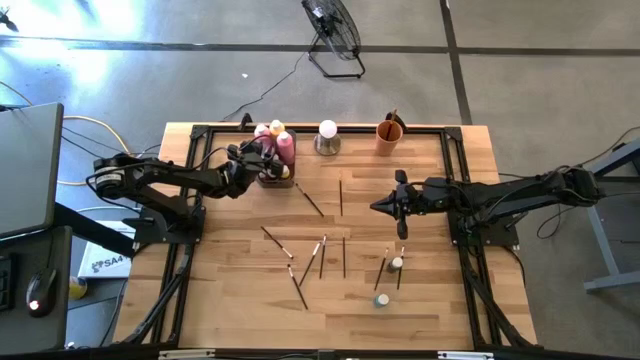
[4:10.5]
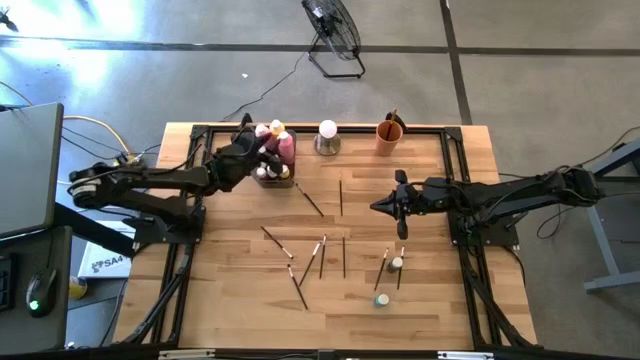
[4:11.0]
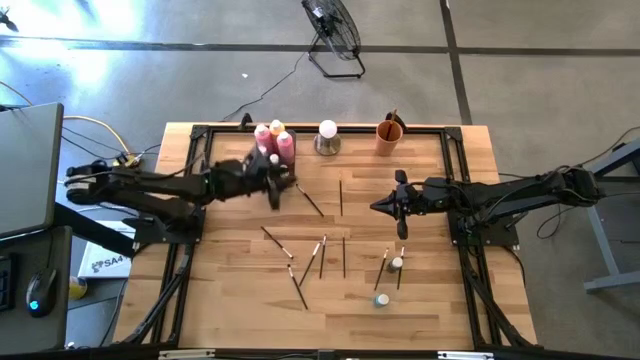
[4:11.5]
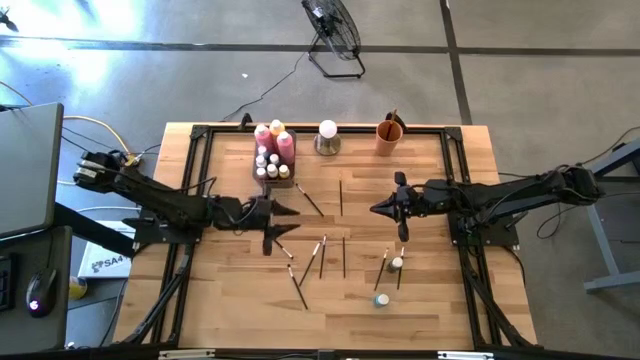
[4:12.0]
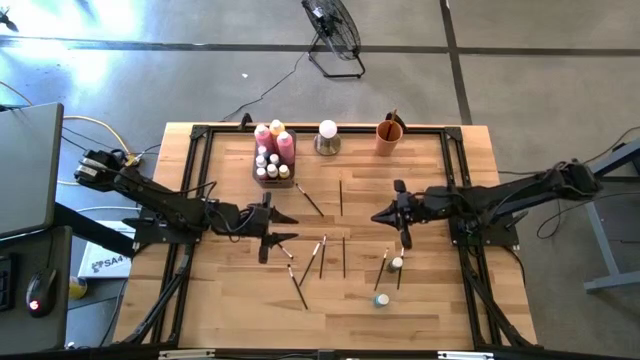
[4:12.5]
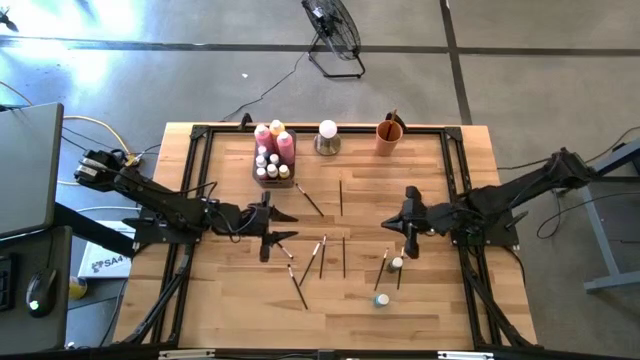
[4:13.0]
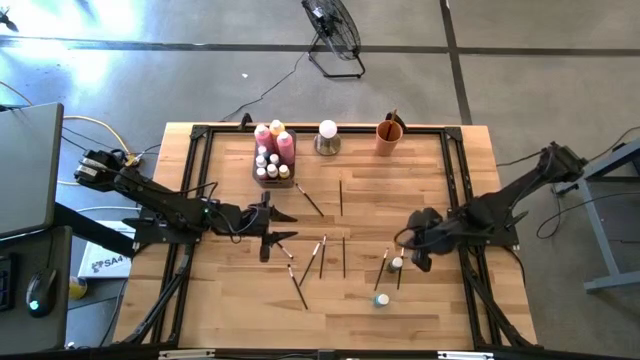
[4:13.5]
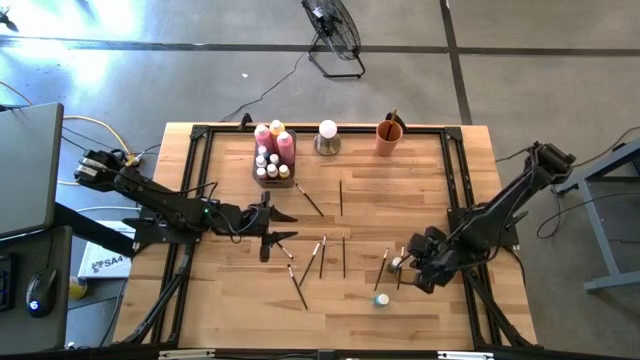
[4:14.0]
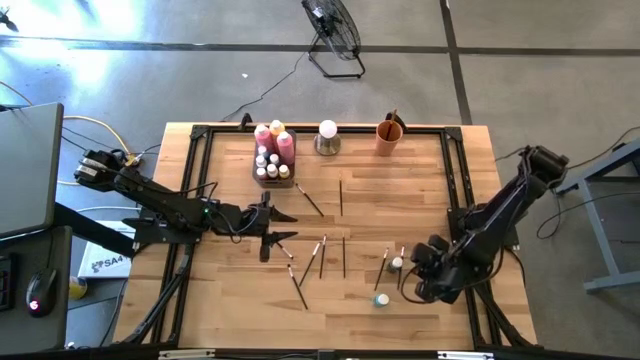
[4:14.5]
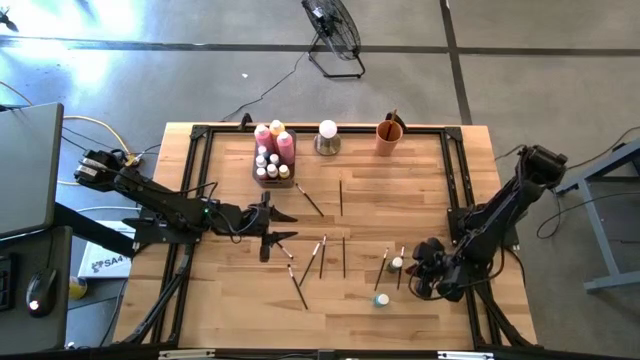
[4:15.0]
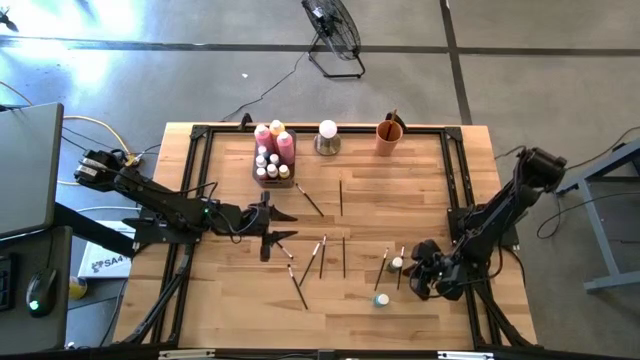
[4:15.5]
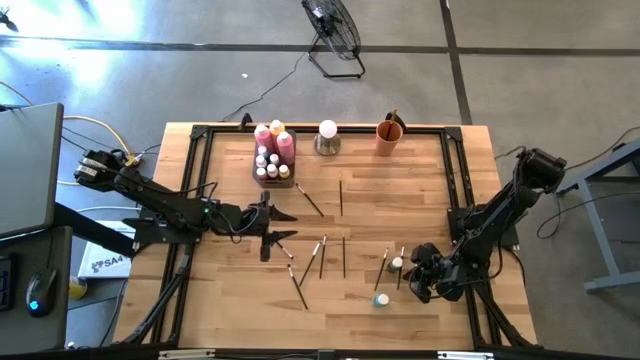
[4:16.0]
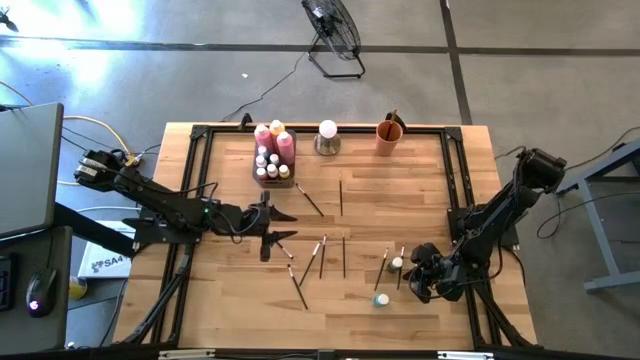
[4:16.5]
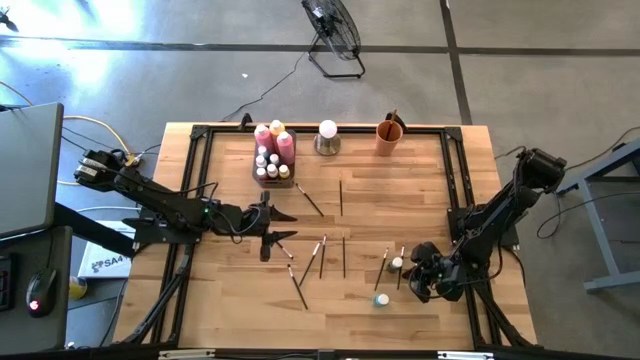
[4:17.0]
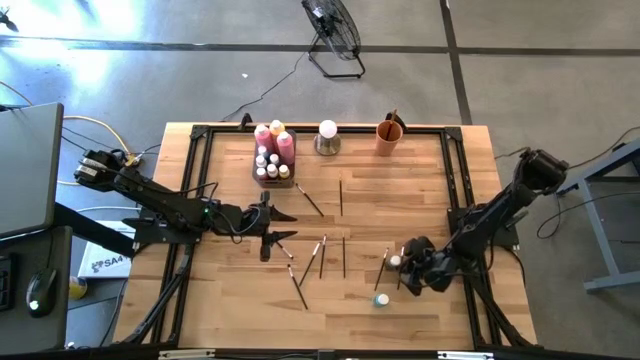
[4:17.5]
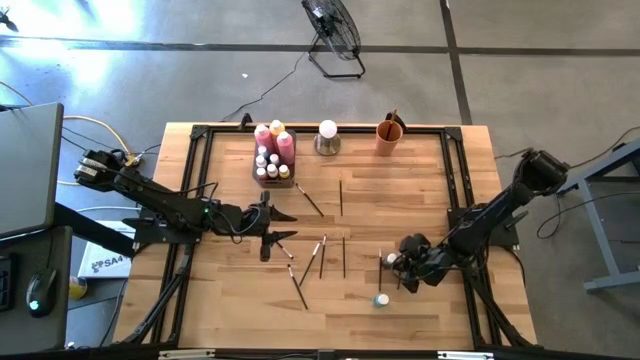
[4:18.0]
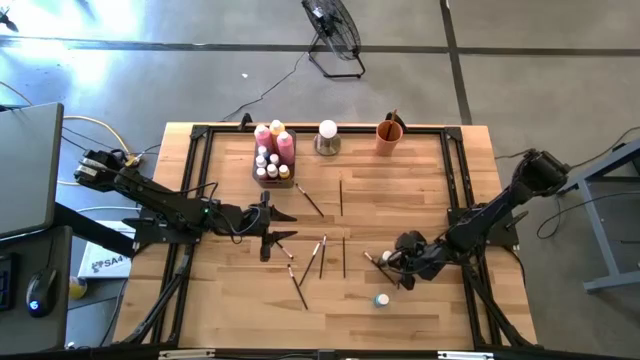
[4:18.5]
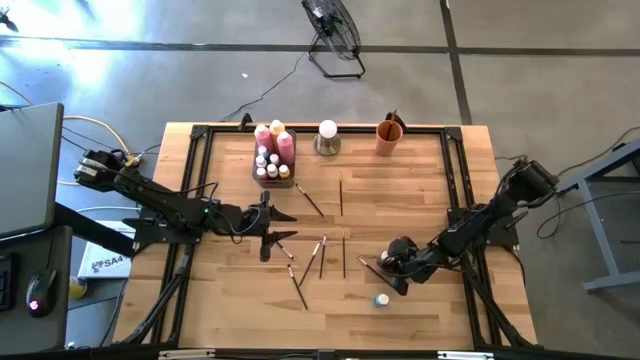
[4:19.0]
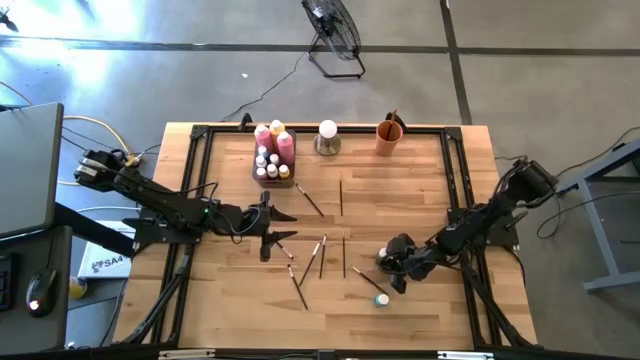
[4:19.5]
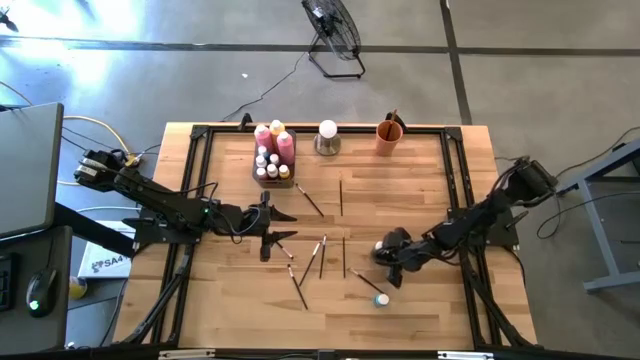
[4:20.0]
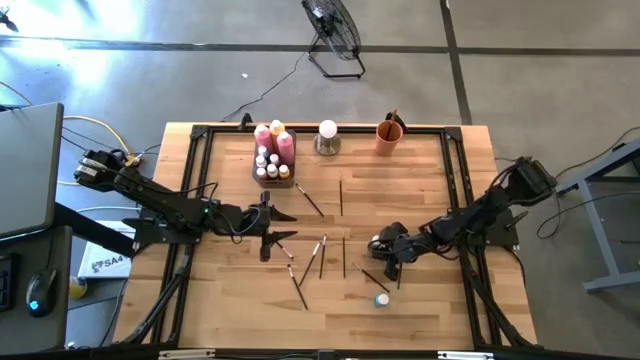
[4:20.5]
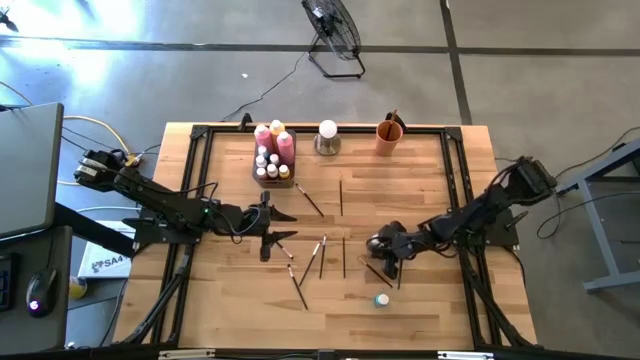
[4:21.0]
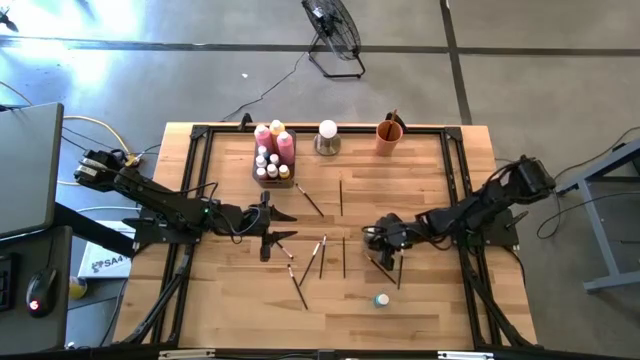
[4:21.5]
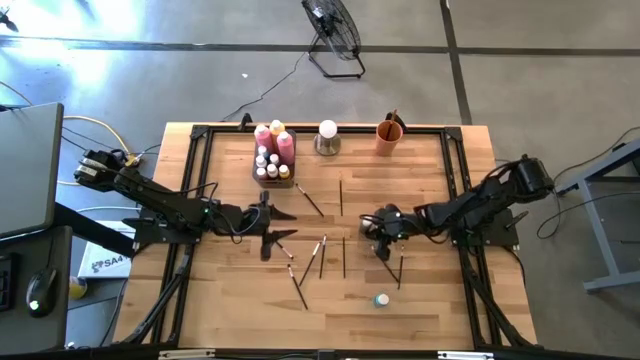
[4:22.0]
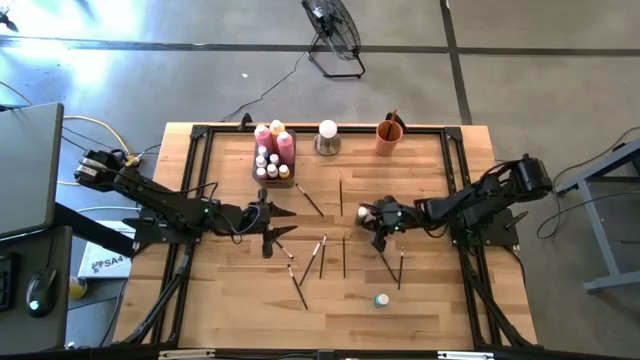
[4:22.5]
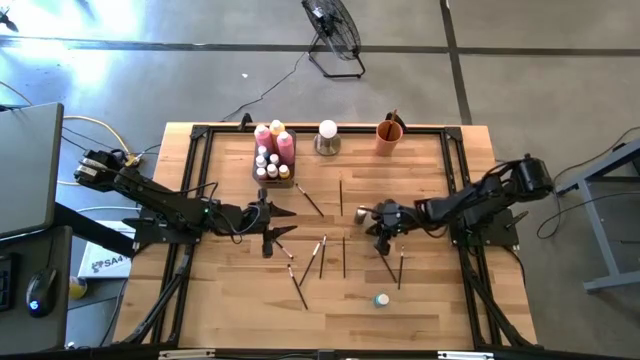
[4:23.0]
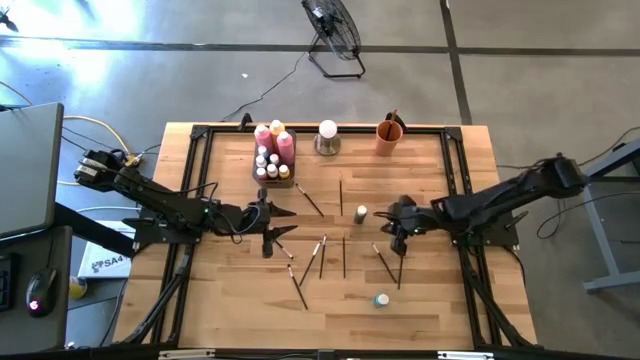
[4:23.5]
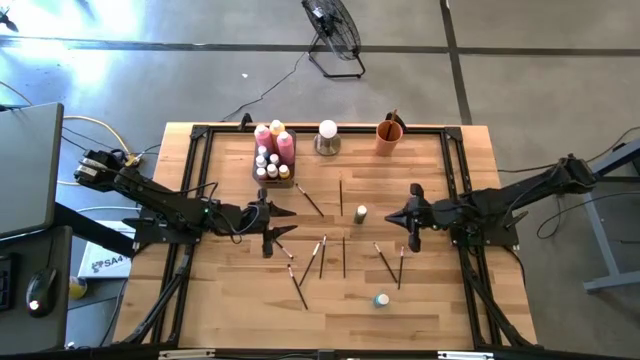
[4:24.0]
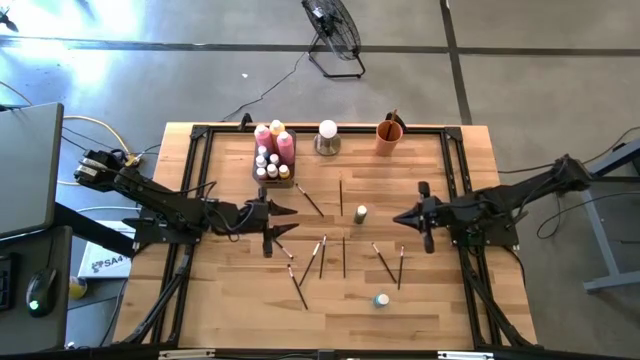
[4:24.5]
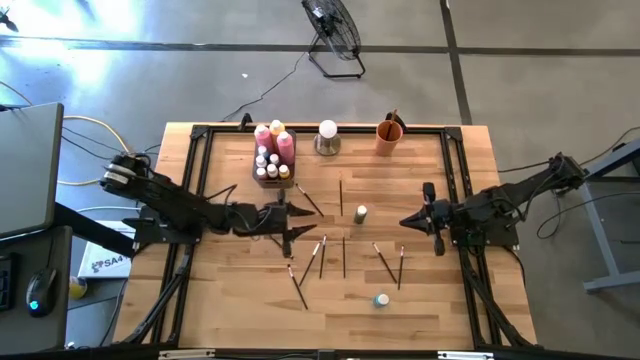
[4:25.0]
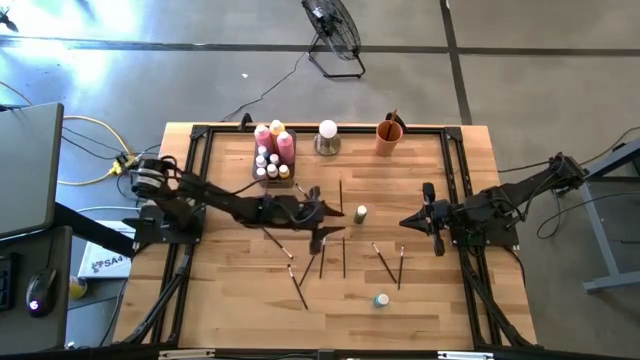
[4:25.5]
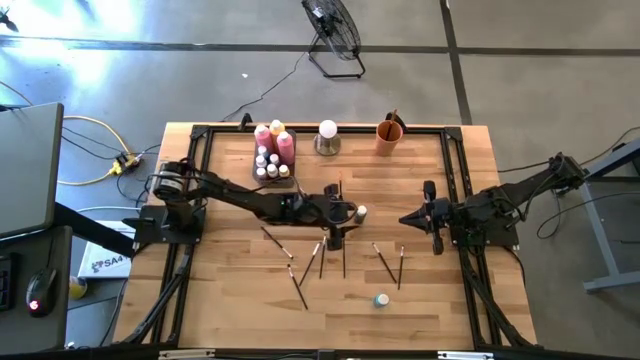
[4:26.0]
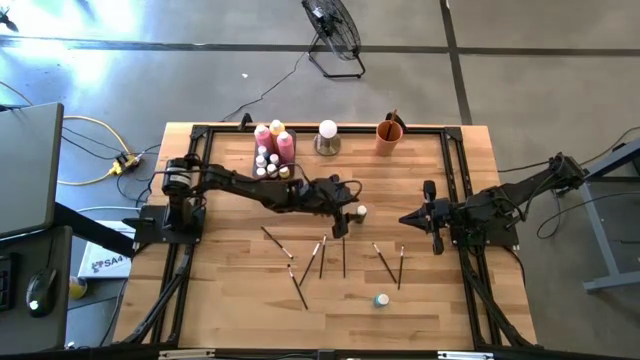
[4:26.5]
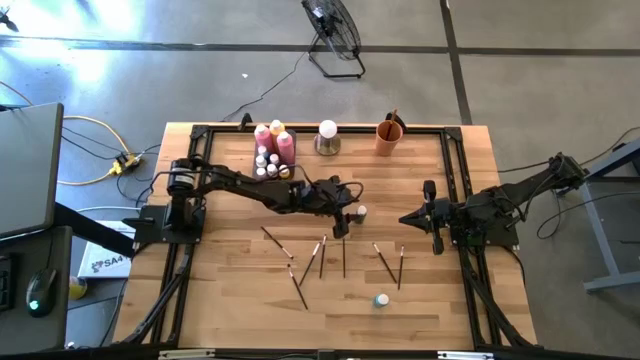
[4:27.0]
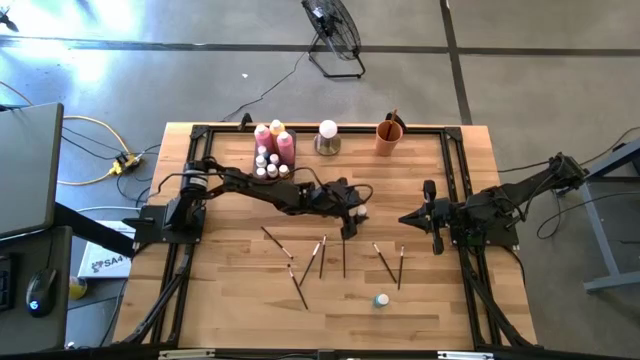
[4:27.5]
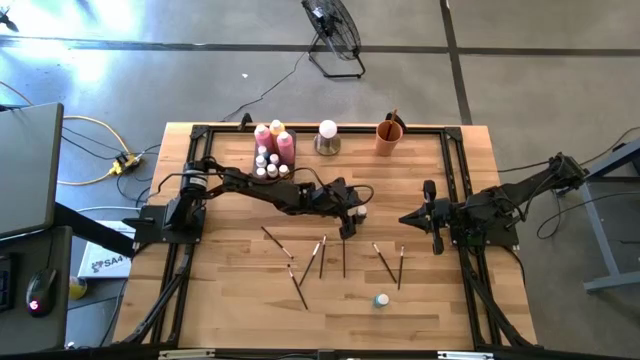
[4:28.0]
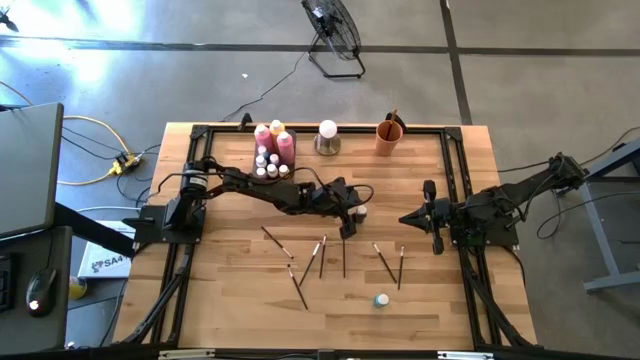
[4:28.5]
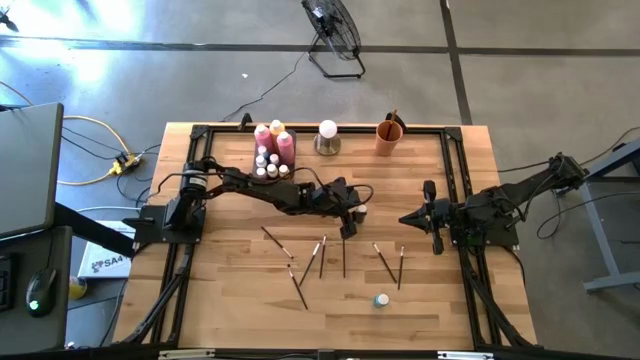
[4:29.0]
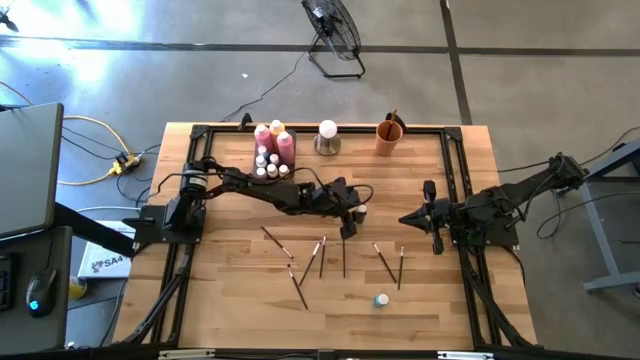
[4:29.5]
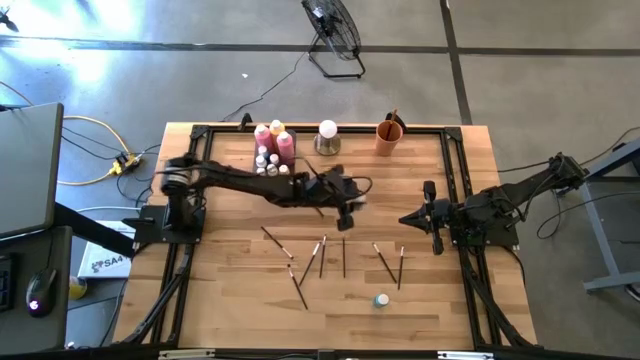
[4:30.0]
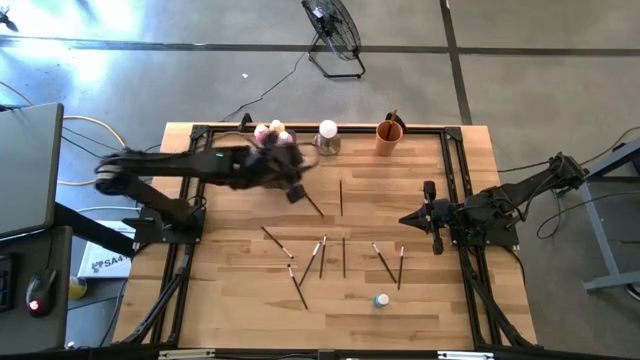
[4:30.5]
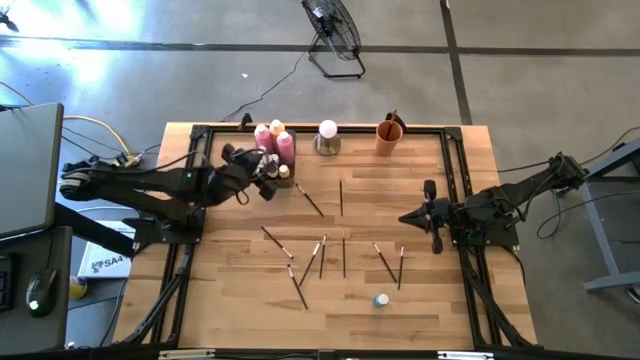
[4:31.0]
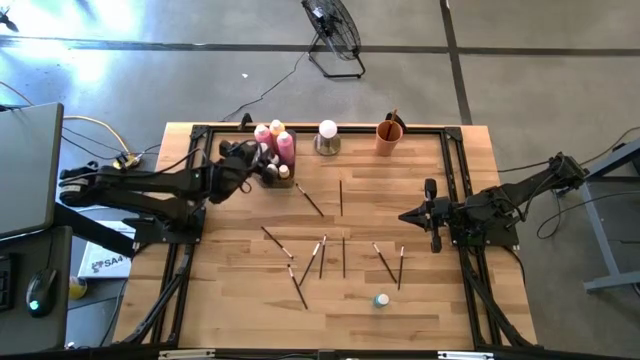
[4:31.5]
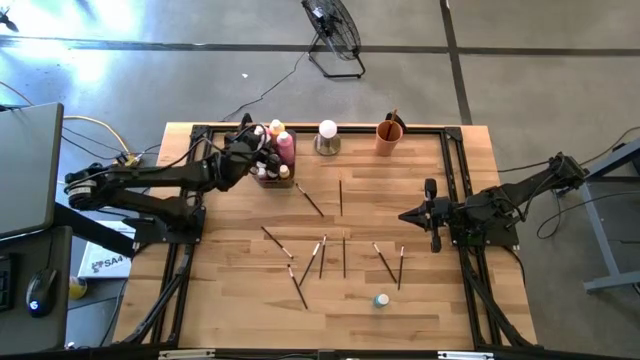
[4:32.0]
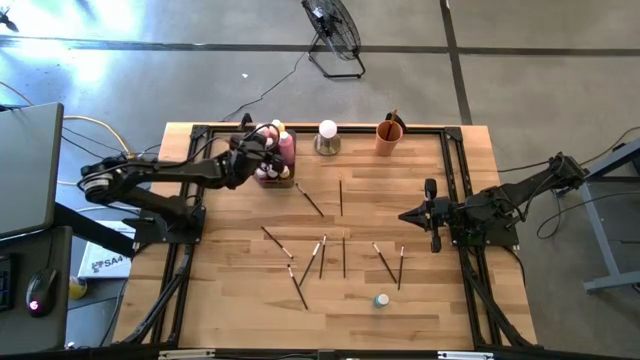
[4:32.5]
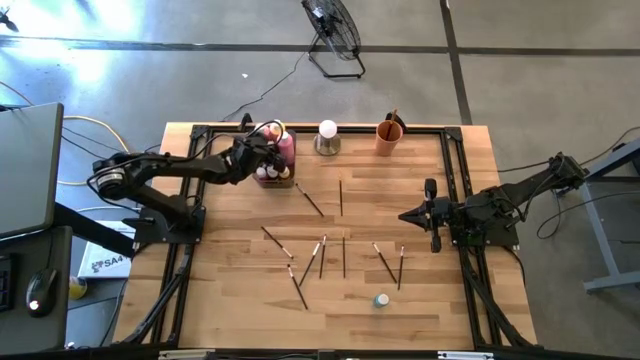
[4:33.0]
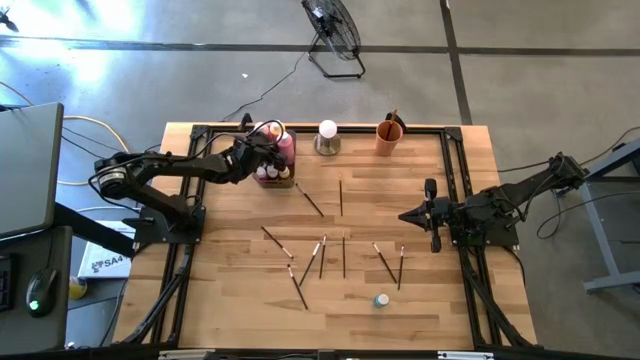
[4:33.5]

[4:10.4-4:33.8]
Task: Pick & Place Paint Supplies
Put the small green paint bottle into the gray bin
